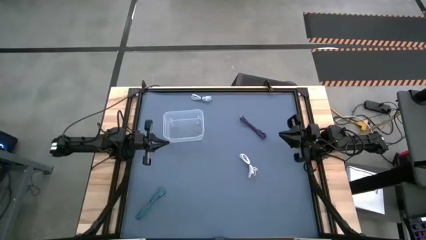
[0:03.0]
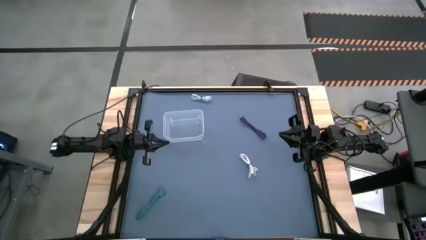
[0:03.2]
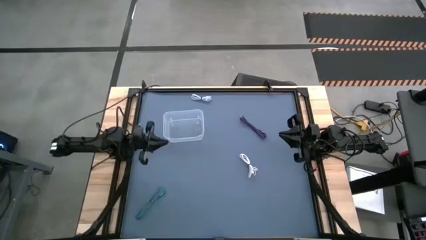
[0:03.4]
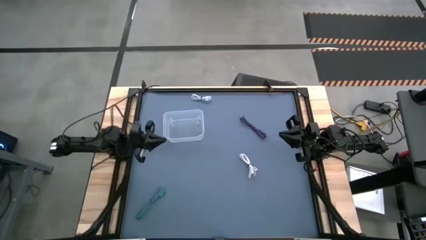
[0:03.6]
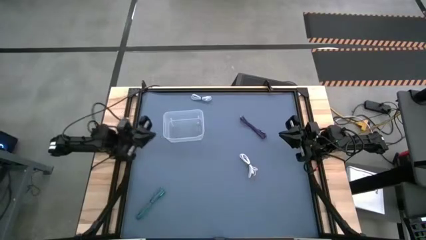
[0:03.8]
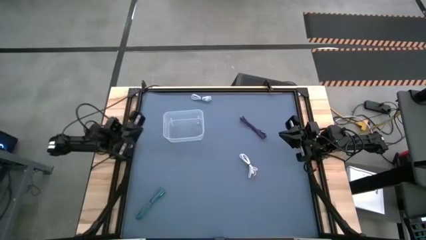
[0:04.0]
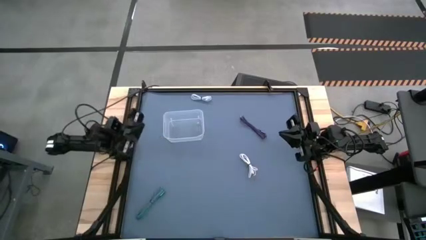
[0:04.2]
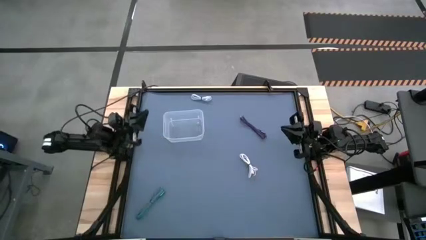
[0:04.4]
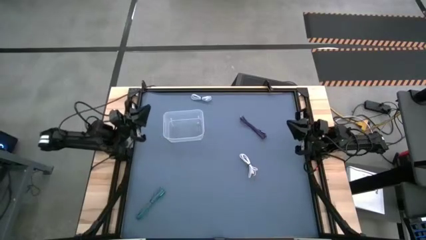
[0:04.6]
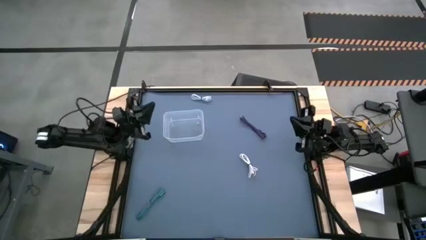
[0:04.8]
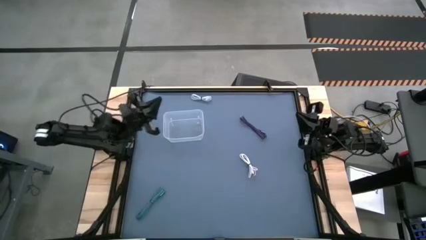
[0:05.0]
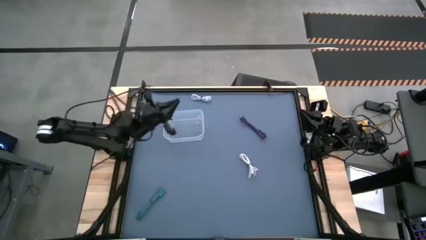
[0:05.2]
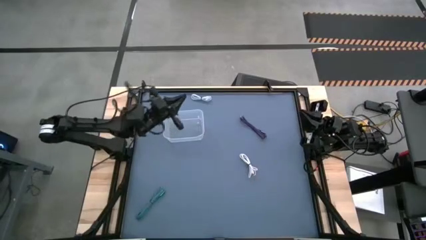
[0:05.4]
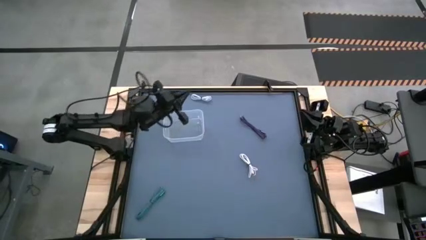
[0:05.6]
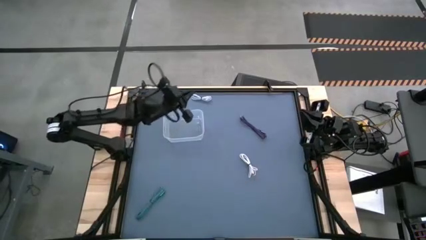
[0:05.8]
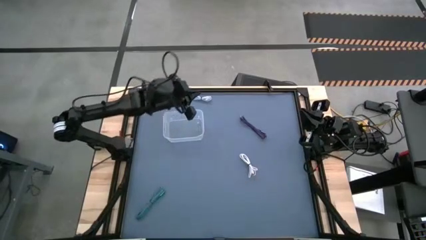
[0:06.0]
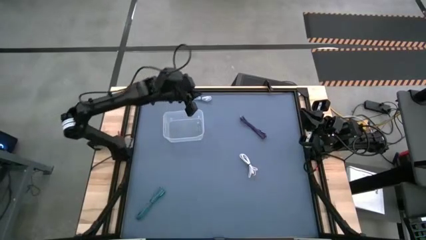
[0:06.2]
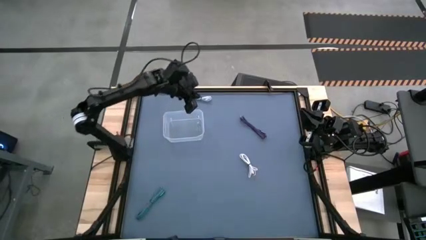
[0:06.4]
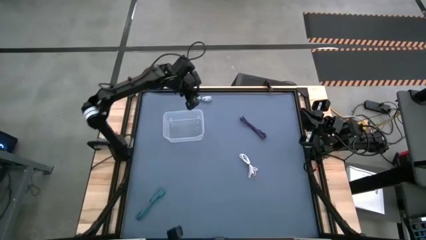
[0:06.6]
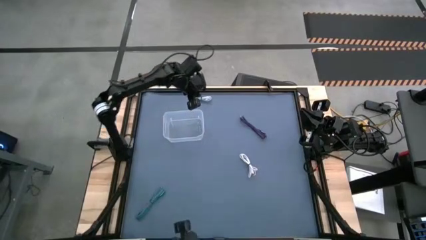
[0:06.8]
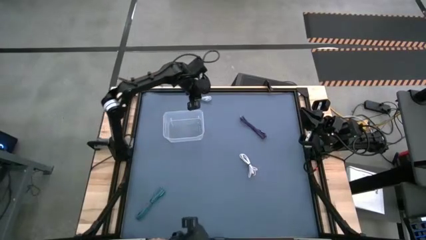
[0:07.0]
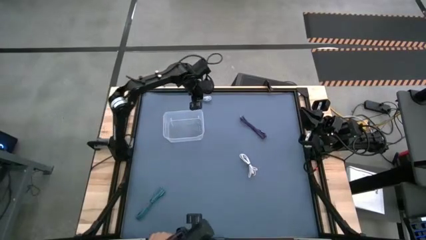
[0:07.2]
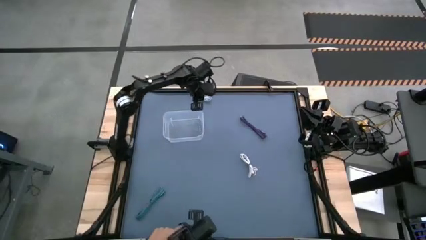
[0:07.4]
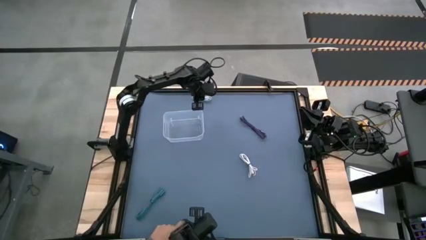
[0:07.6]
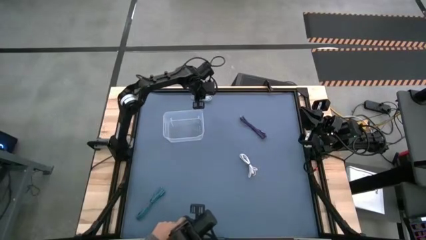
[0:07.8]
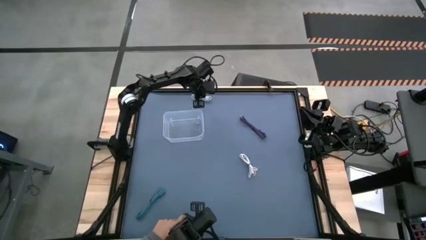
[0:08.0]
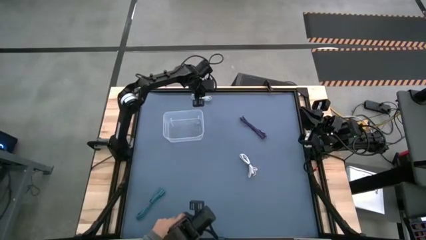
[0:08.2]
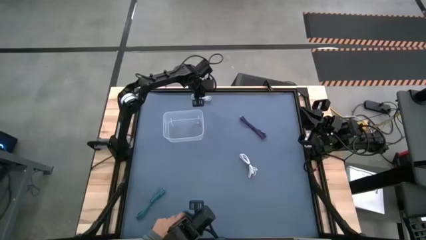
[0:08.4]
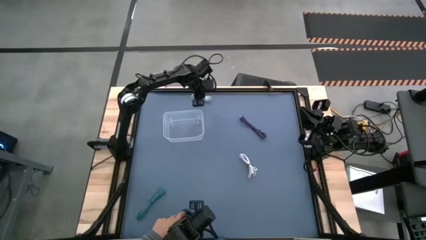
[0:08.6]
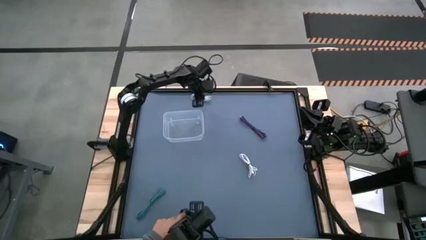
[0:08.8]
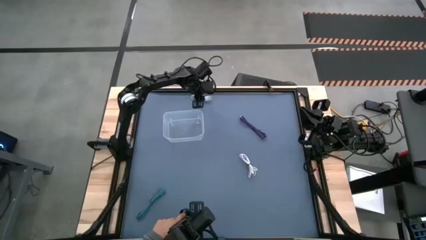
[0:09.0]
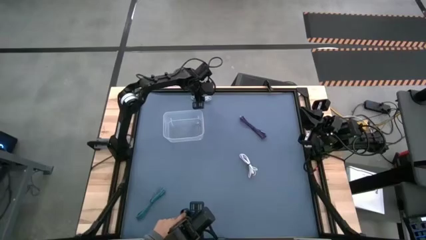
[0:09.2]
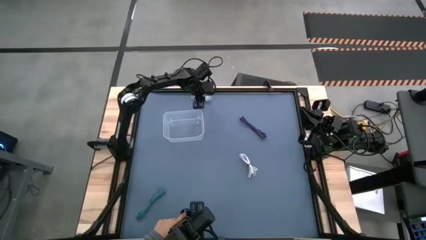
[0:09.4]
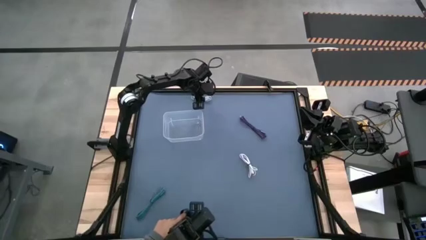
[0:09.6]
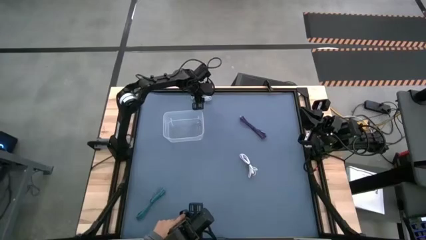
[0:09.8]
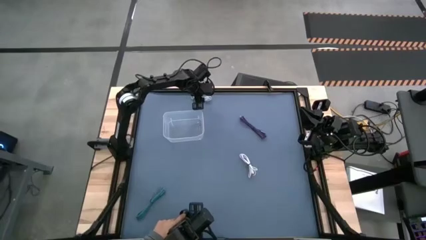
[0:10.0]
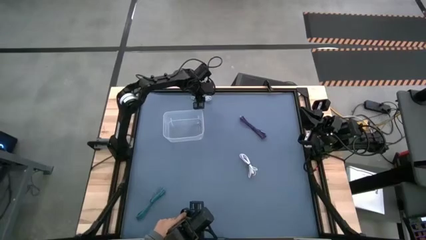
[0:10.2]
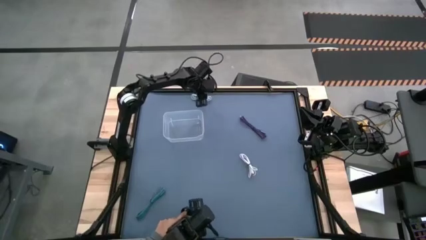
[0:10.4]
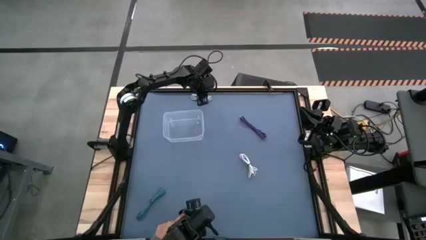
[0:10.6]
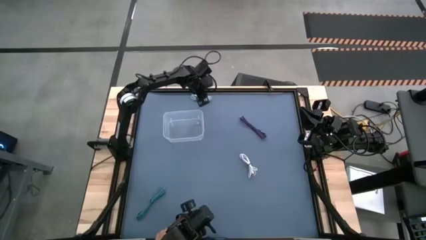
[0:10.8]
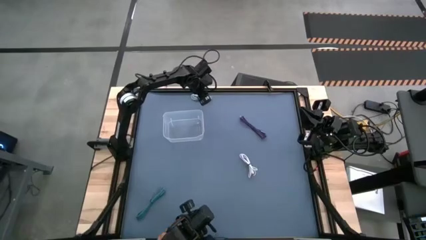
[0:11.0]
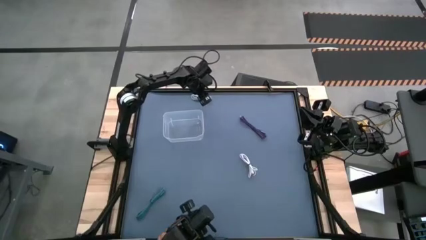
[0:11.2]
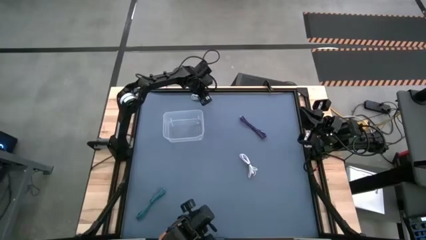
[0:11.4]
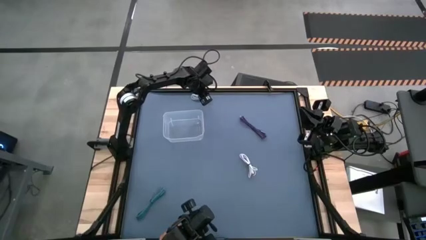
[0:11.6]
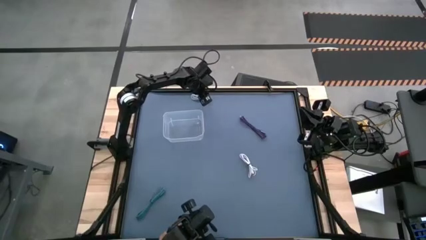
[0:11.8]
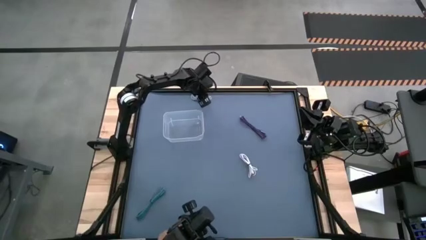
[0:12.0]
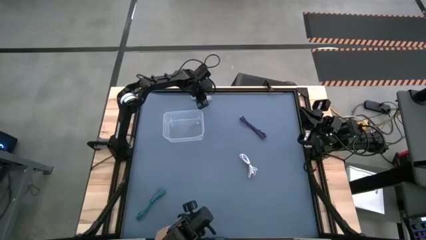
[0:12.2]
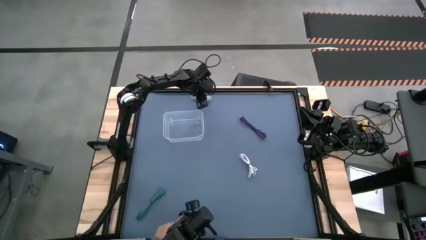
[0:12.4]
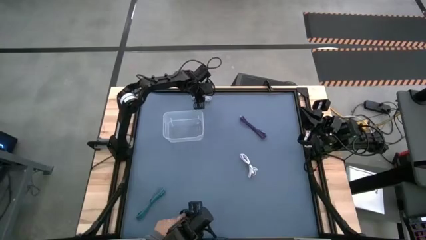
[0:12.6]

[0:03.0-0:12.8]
Task: Pick and place USB-C Cables
Put the top white charger cable into the bin

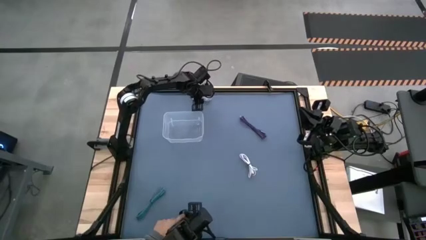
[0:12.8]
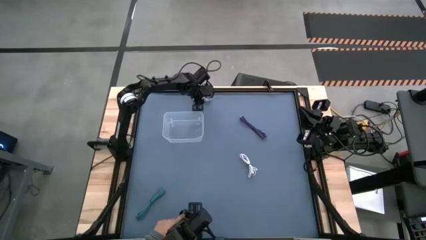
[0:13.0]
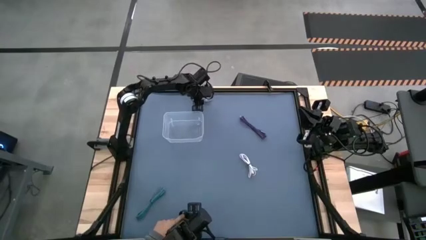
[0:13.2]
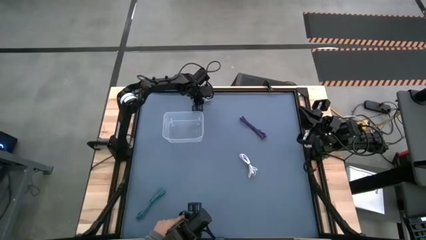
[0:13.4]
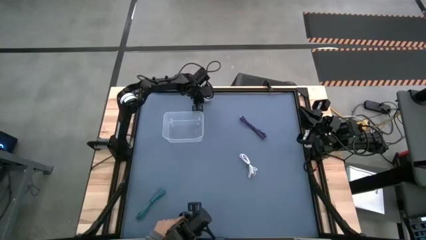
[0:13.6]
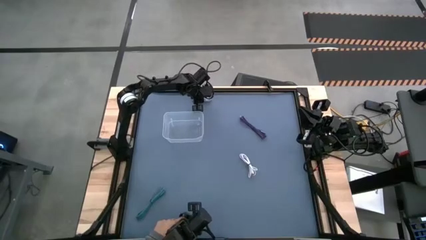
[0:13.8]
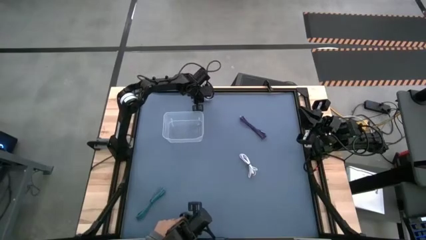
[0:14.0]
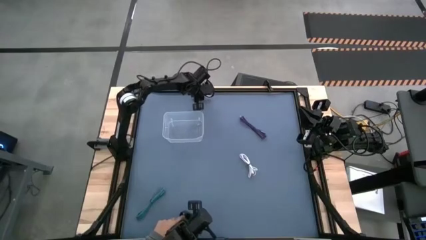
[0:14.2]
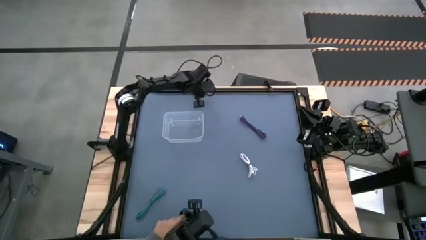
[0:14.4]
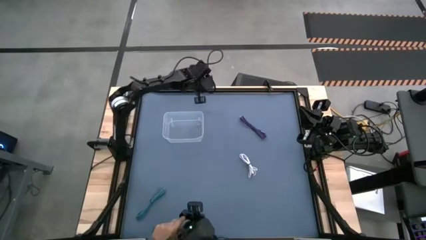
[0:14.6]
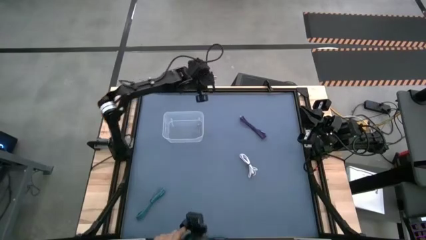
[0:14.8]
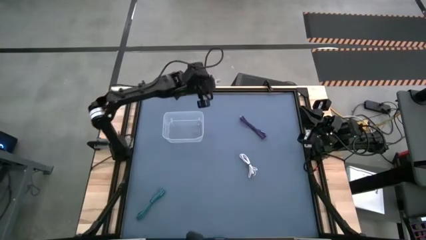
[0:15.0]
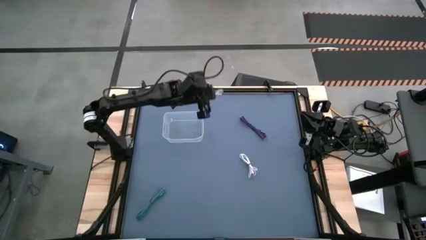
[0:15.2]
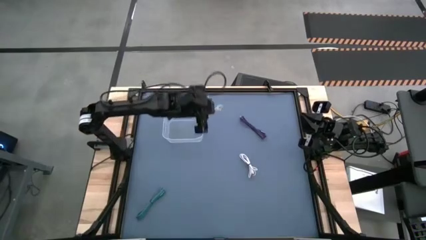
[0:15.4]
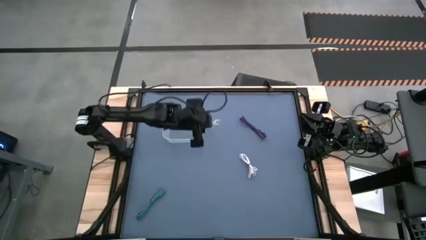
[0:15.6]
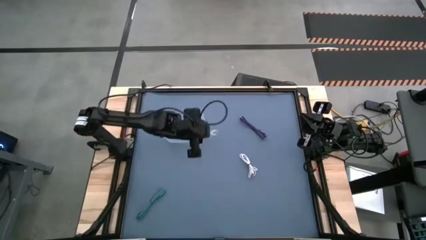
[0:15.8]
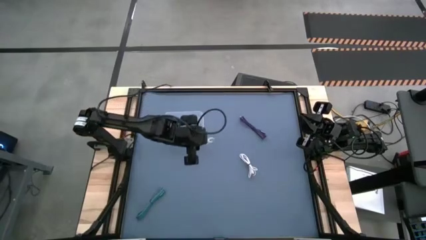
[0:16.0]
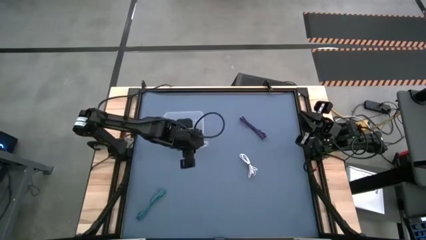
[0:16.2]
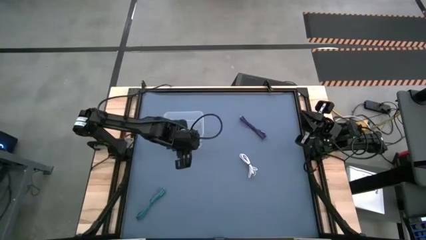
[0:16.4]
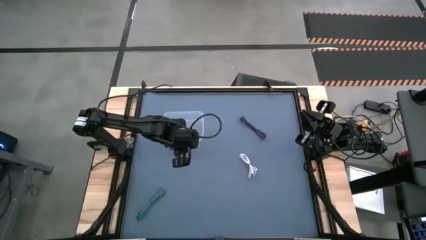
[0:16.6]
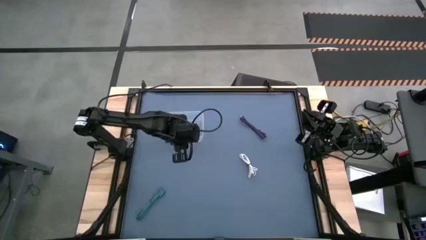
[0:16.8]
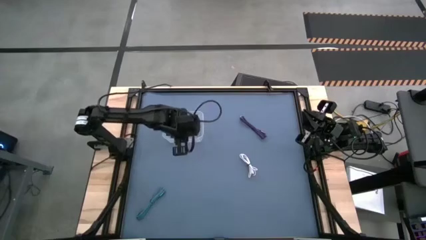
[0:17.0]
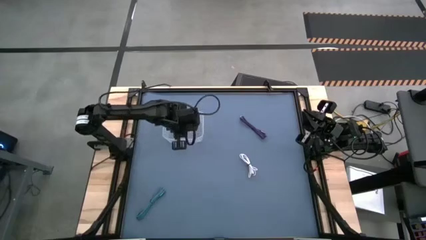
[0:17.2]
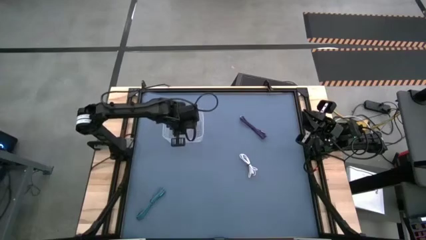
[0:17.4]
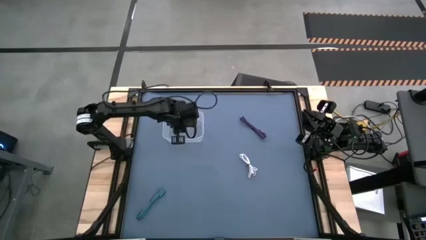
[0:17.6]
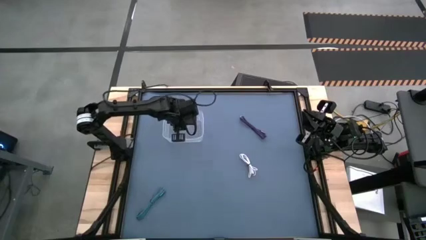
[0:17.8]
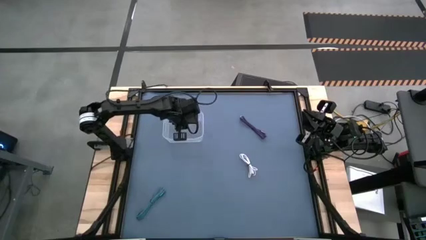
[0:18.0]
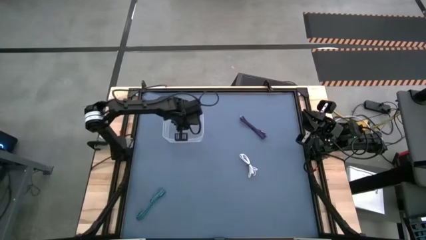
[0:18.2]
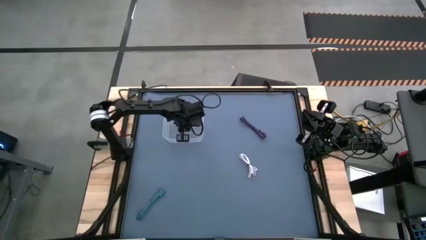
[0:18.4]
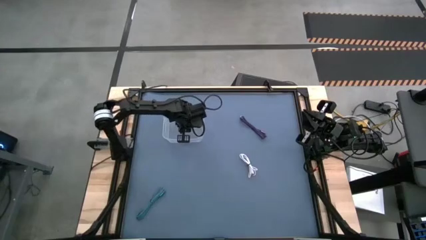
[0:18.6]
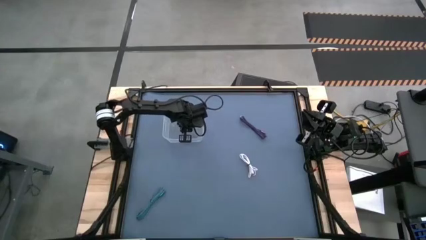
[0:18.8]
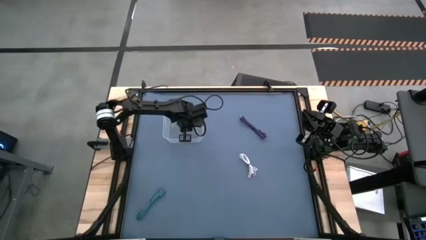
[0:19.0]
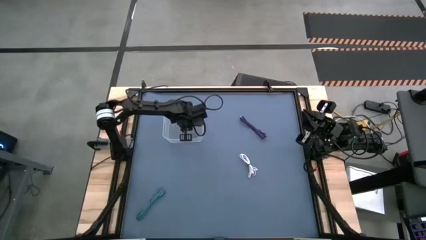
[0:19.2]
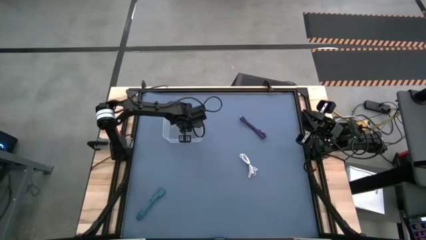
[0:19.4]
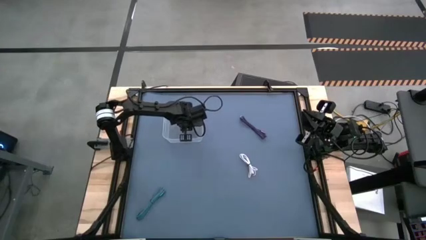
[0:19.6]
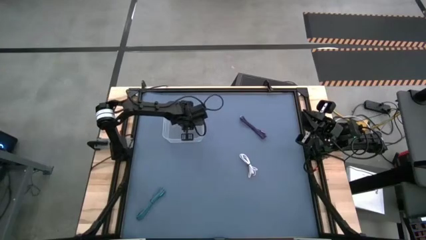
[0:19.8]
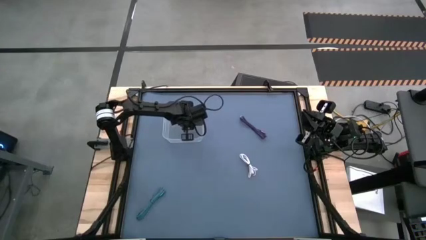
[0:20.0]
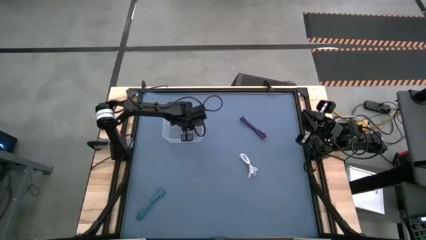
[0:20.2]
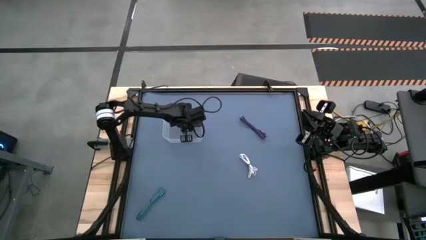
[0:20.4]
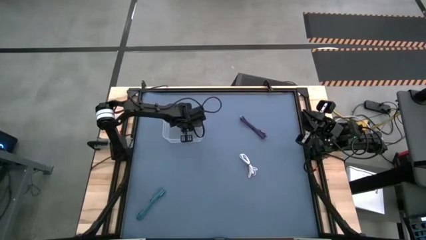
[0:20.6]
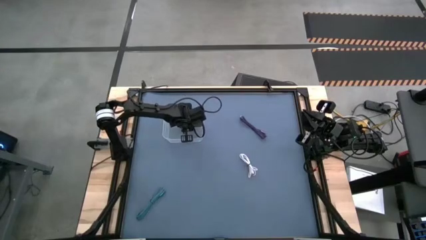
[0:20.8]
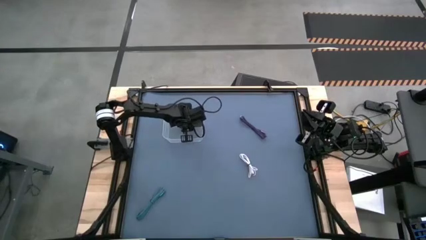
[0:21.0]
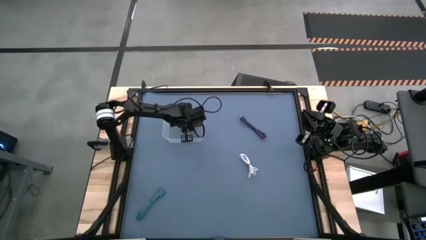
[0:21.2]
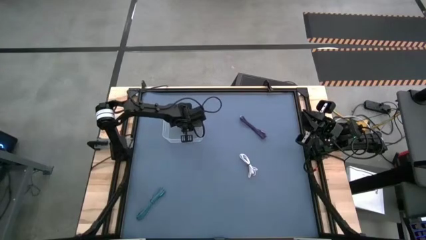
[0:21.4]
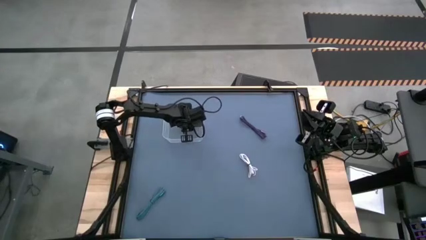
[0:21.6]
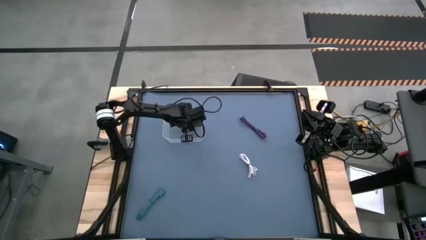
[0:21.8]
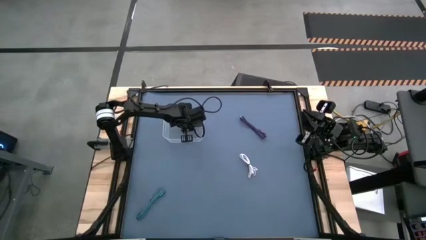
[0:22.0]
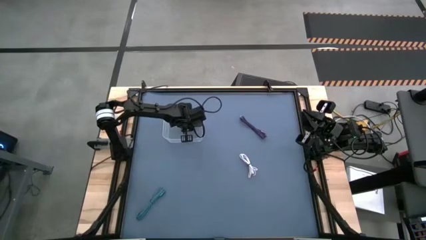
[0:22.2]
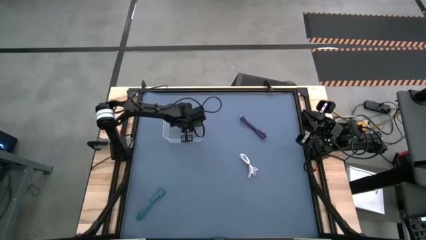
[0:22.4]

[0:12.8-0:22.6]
Put the top white charger cable into the bin
